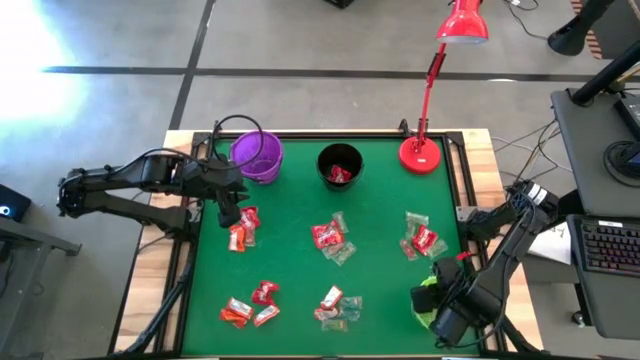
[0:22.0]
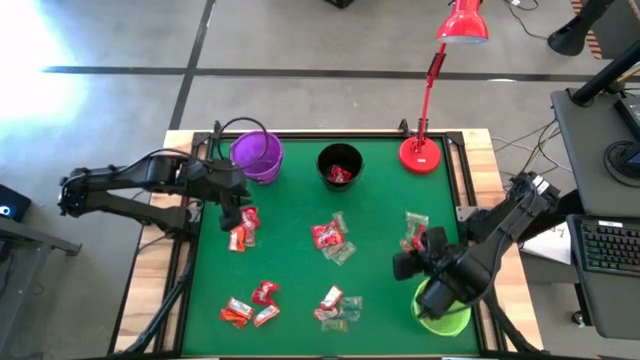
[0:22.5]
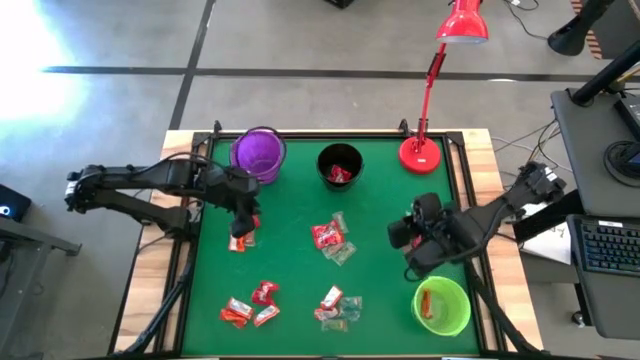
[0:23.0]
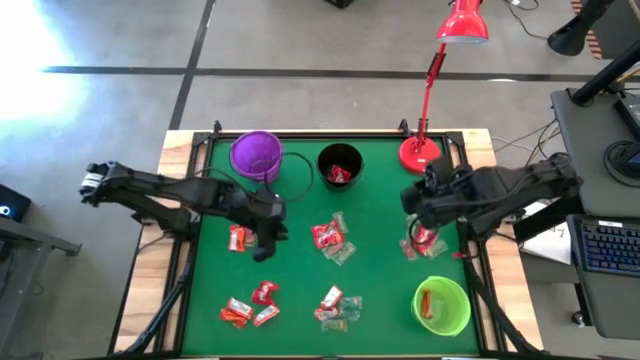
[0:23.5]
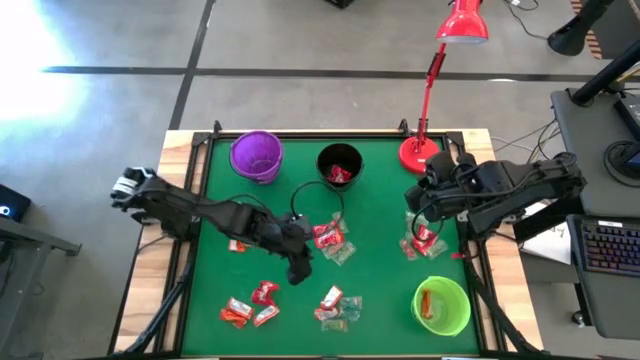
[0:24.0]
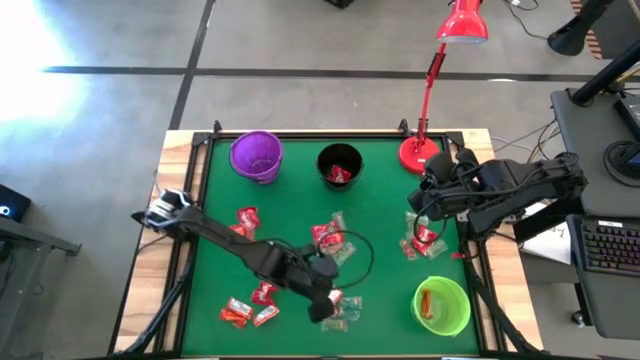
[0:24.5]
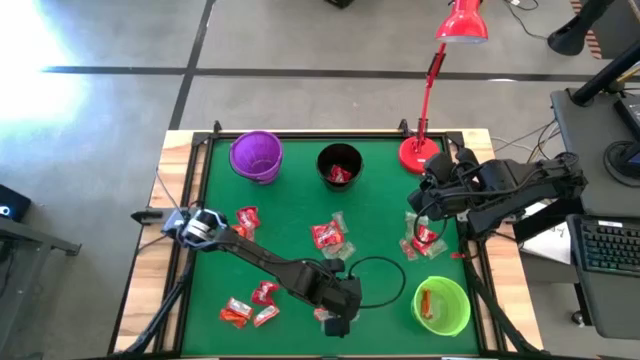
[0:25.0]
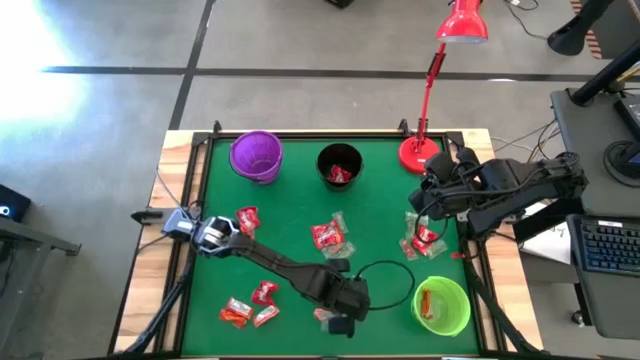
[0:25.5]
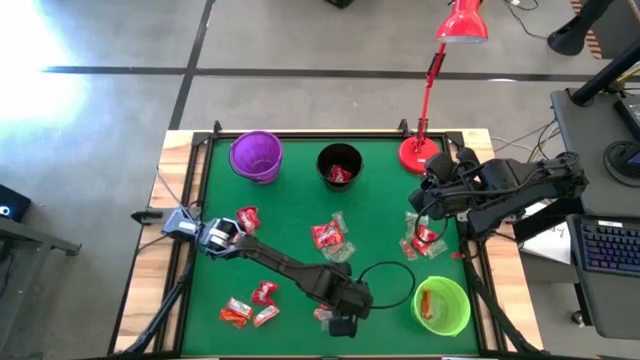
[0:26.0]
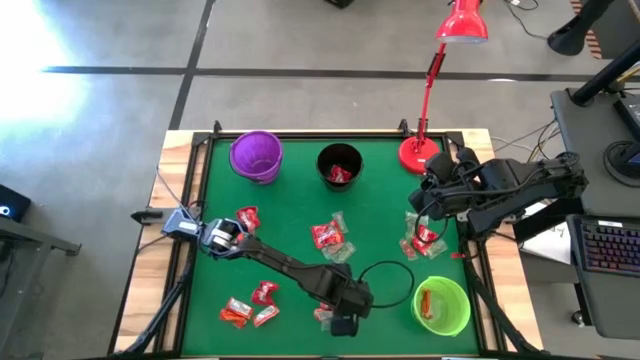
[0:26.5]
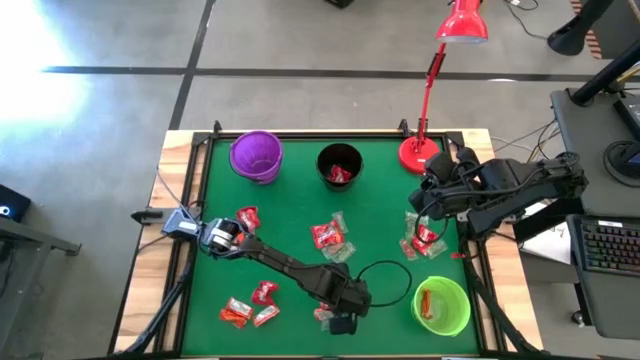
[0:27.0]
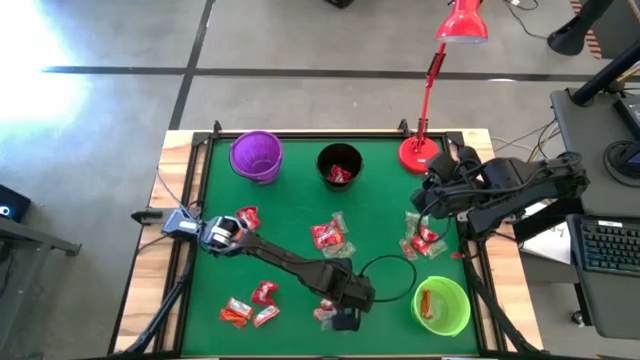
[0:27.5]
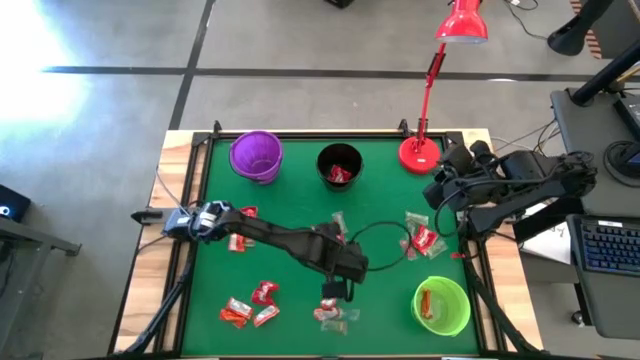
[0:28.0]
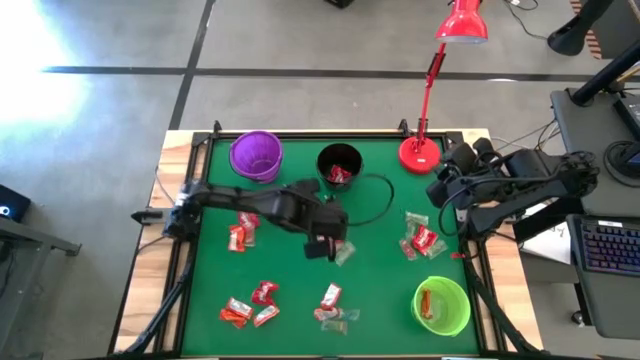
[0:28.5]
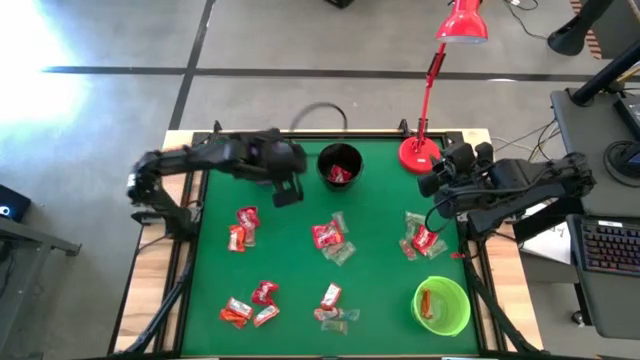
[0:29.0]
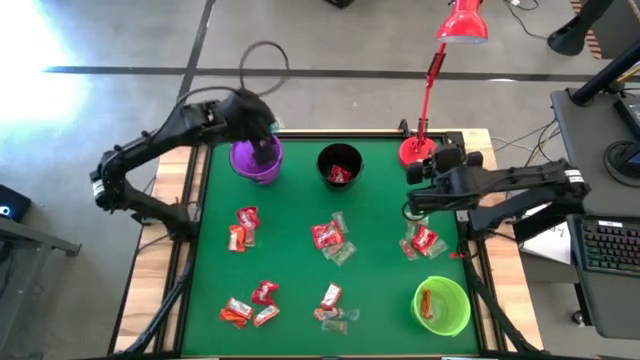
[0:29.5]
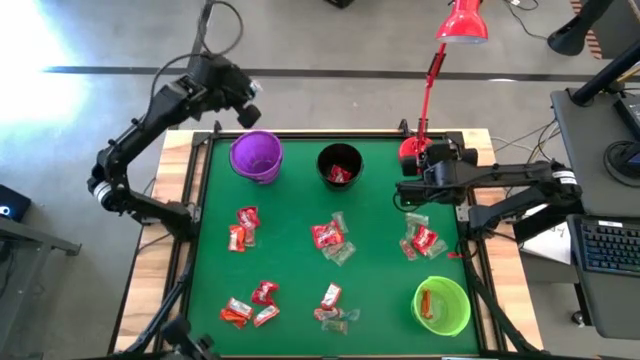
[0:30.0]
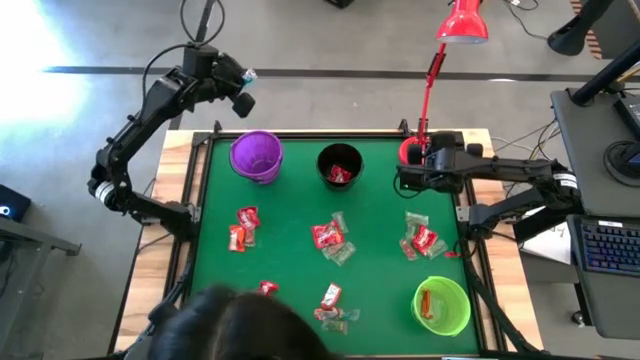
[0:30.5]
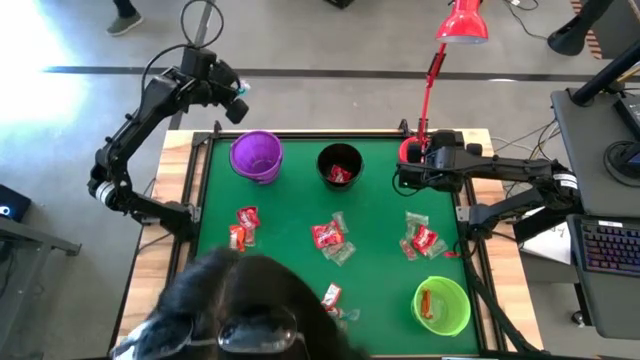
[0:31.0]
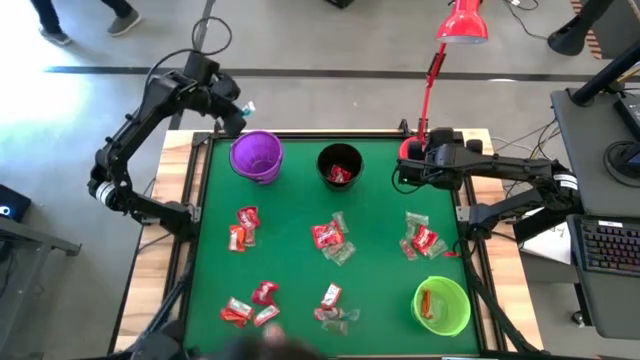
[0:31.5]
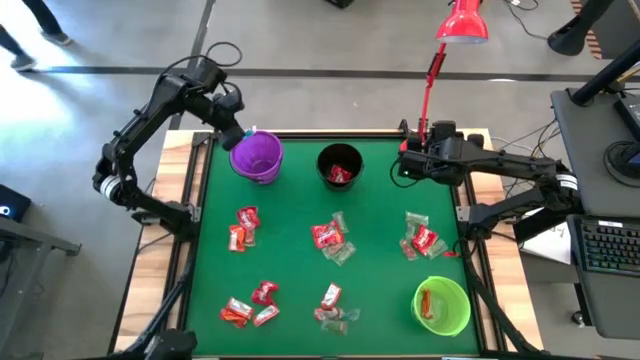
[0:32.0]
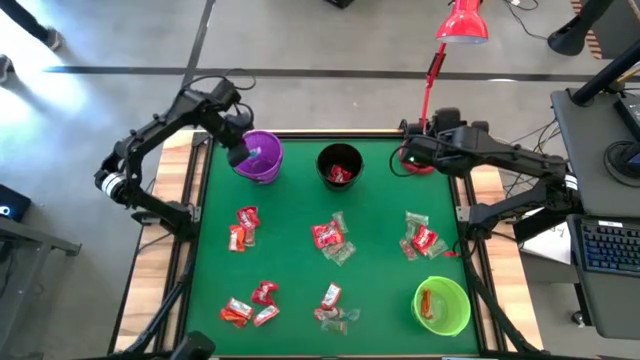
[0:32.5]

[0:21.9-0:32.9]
Task: Sort candy
Put the blue gummy into the violet bucket

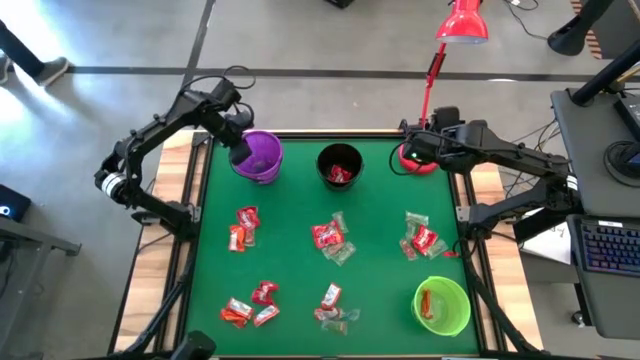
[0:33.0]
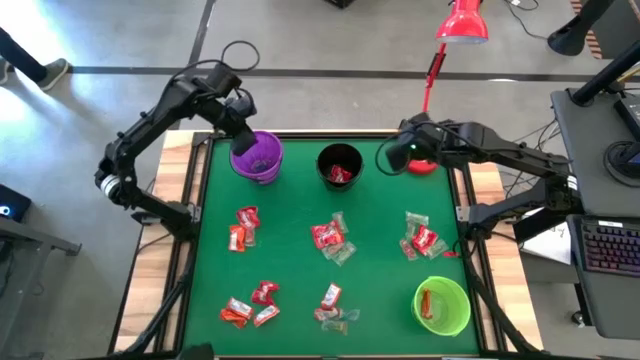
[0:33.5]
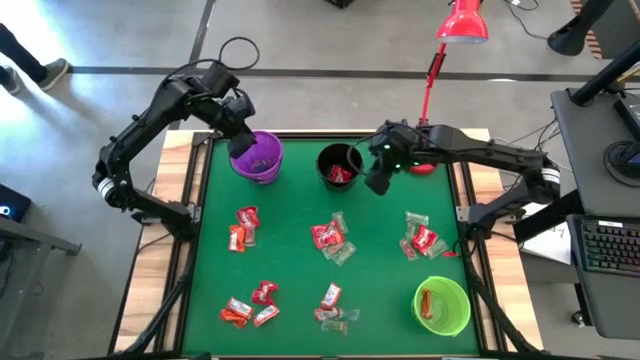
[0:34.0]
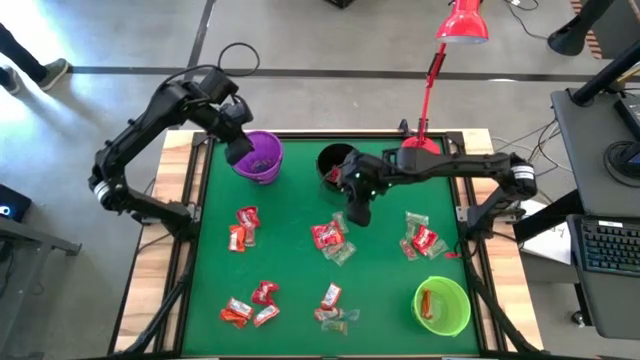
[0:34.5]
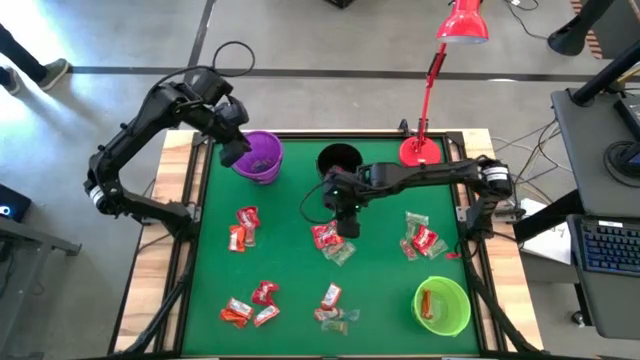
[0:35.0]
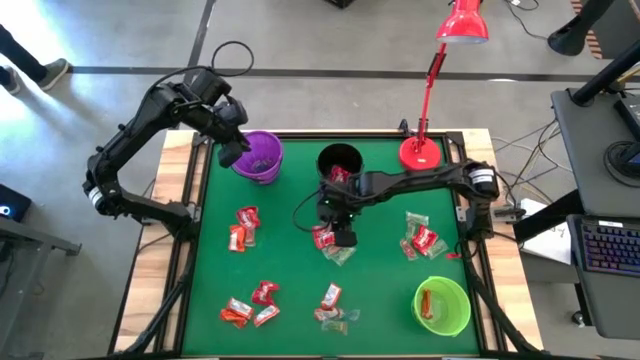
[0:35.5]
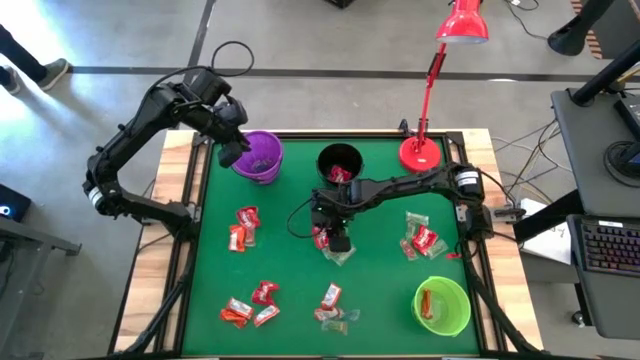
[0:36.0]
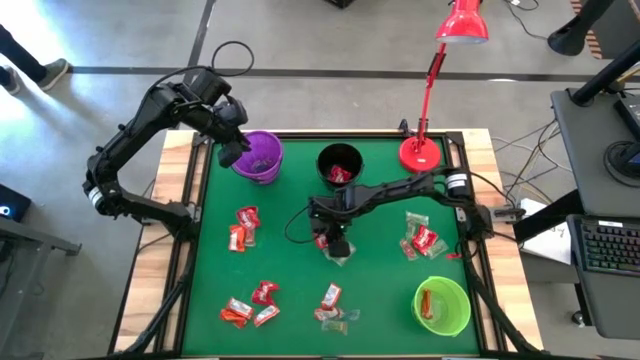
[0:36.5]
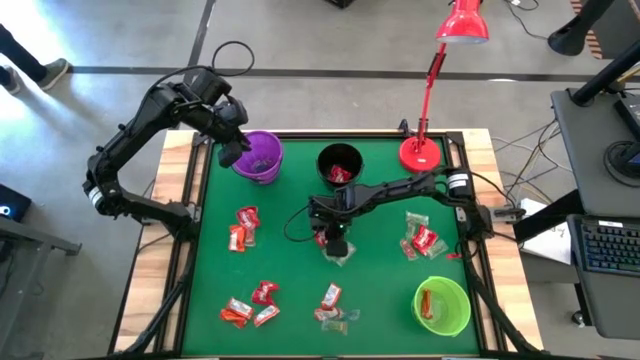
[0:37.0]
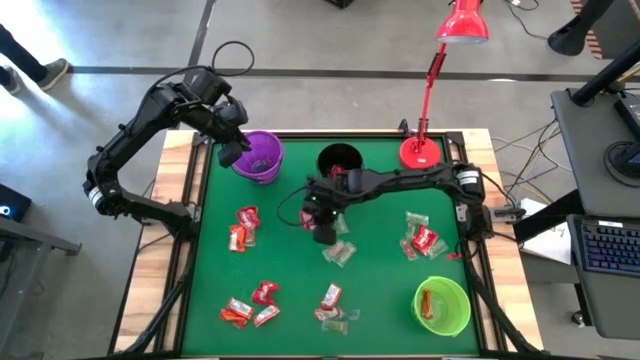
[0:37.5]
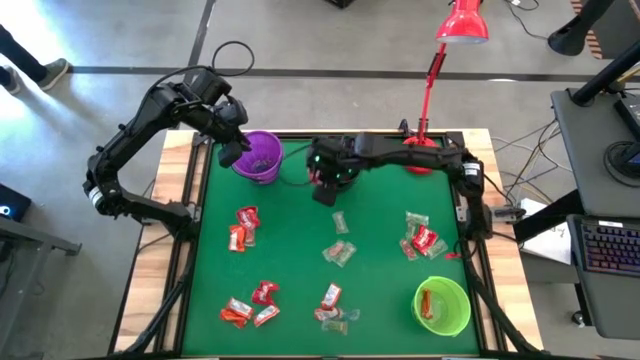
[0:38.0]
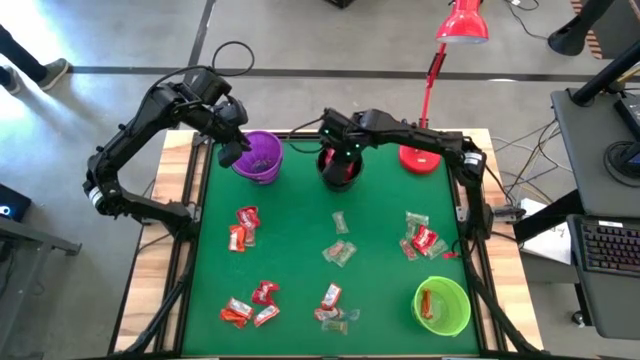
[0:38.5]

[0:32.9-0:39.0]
Put the red candy pack into the black bucket

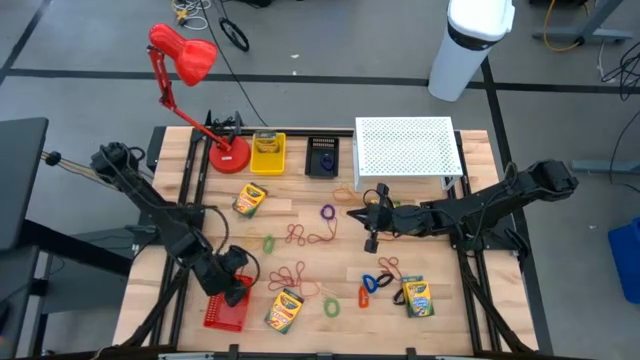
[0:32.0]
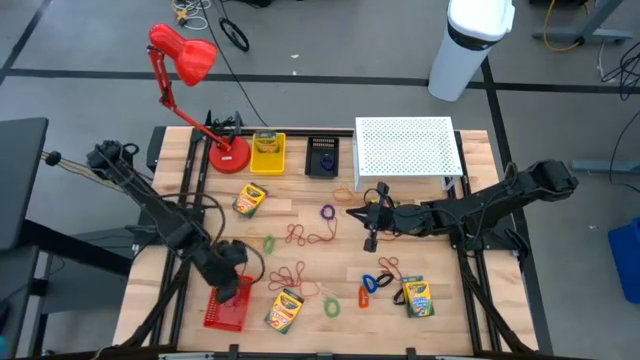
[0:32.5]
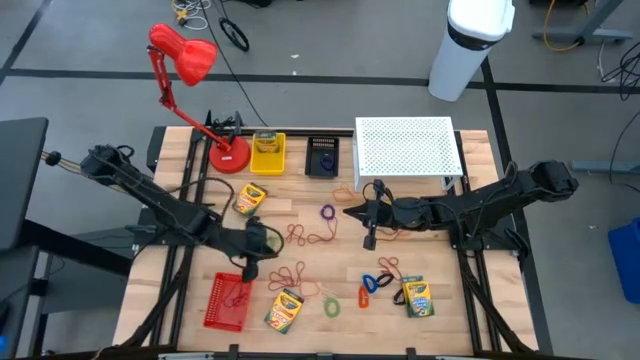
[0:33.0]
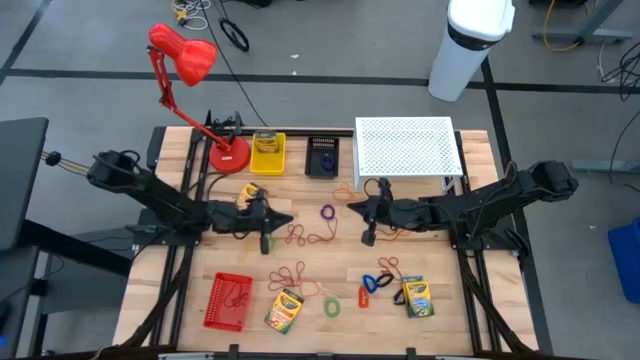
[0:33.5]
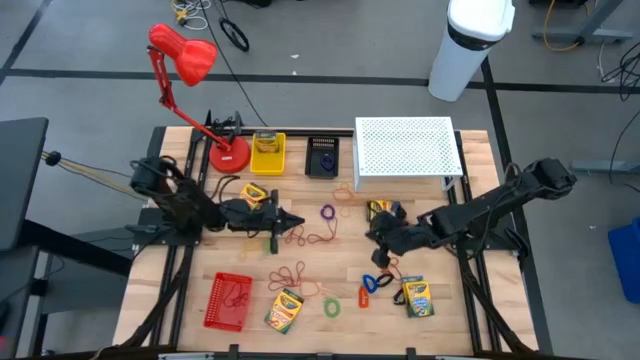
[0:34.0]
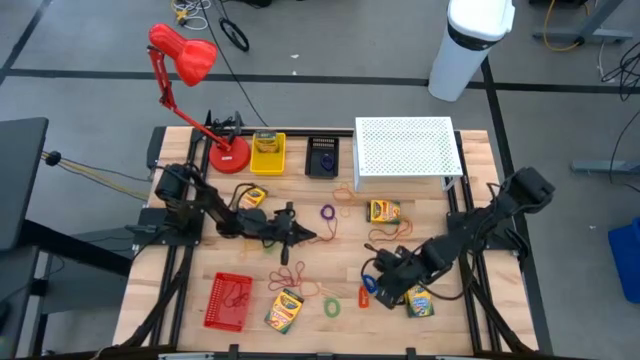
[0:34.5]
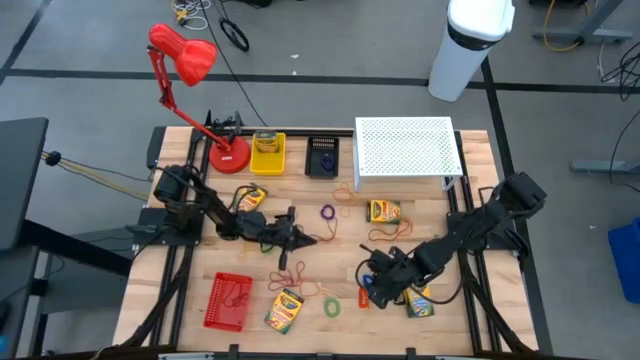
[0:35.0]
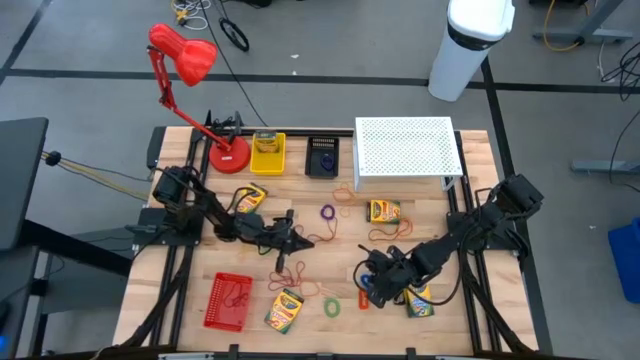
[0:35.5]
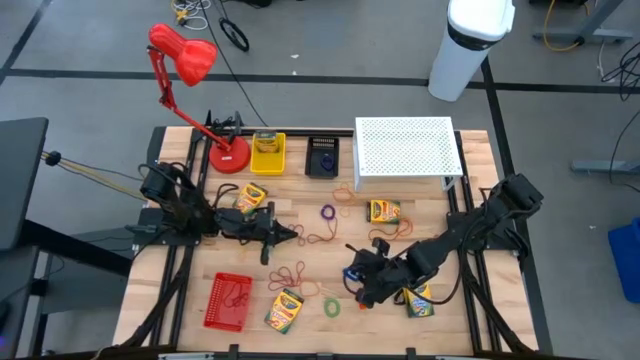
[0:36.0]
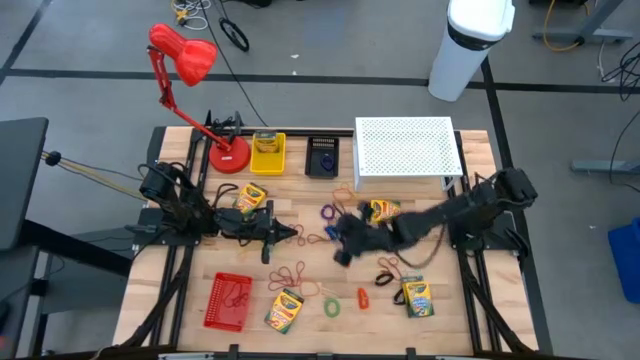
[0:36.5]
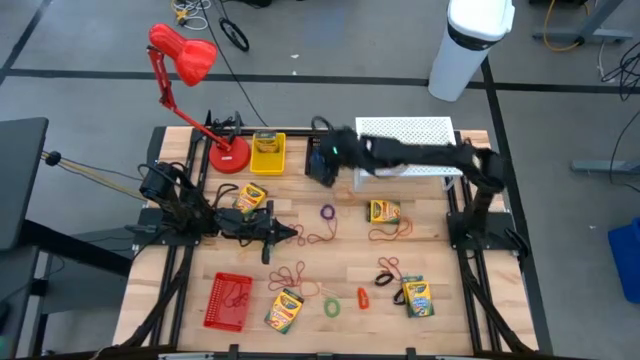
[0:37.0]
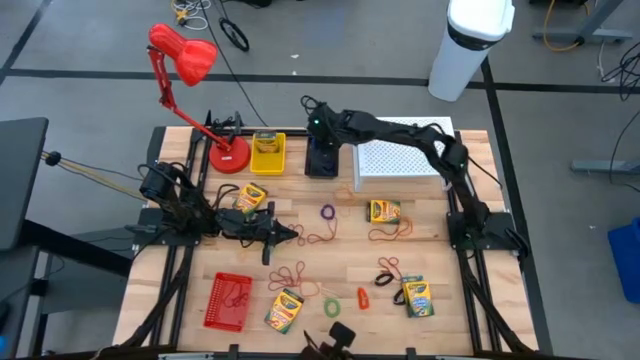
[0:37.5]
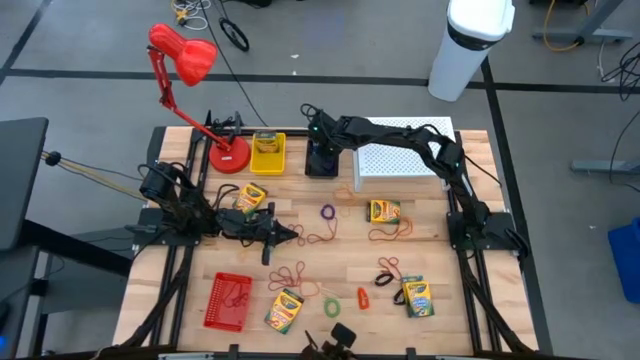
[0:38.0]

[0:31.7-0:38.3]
Task: Pick & Place Office Desk Supplies
Put the blue spiral keychain into the black bin
